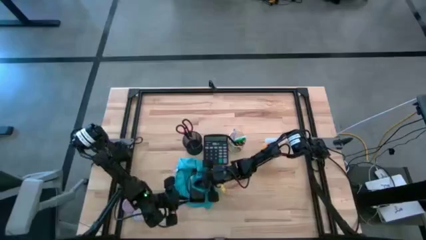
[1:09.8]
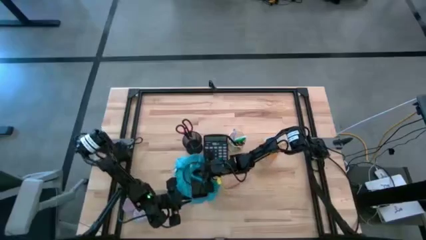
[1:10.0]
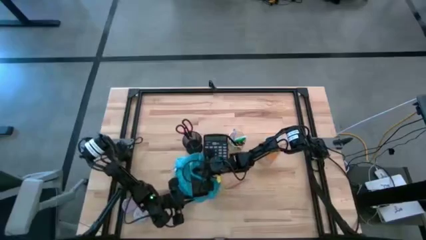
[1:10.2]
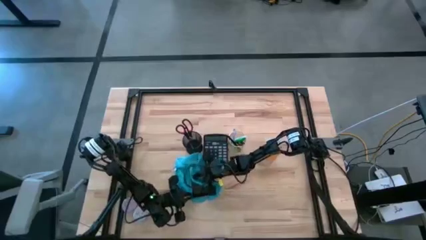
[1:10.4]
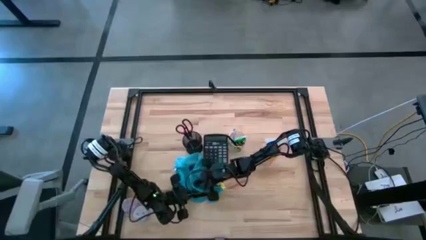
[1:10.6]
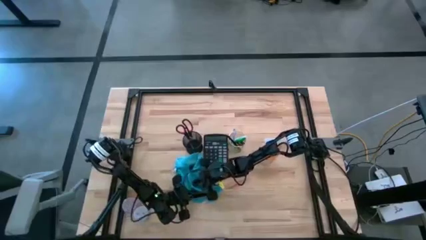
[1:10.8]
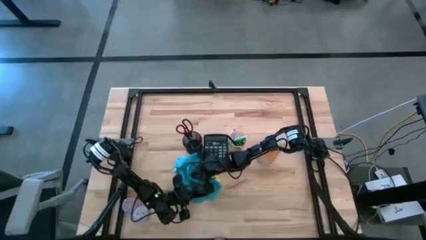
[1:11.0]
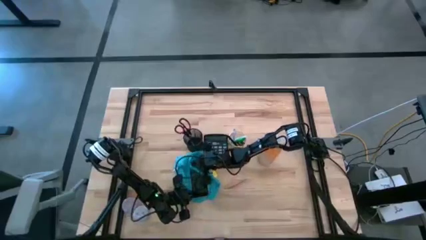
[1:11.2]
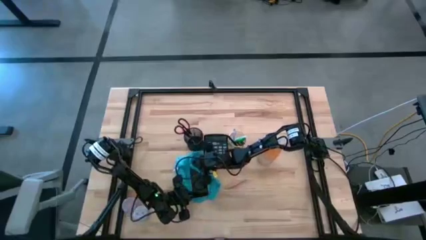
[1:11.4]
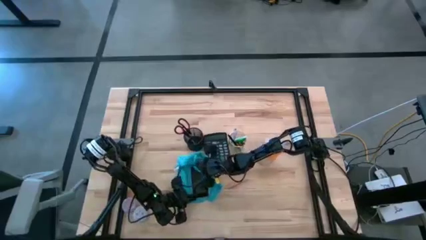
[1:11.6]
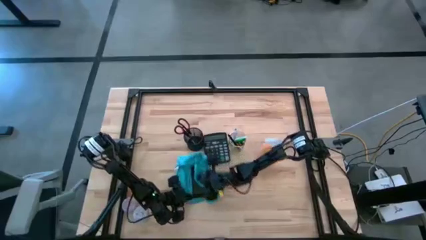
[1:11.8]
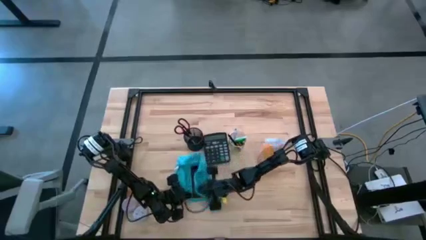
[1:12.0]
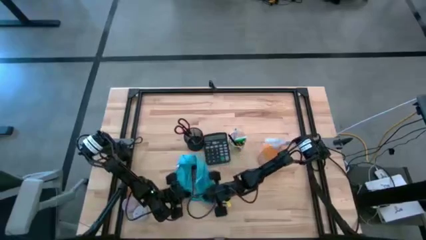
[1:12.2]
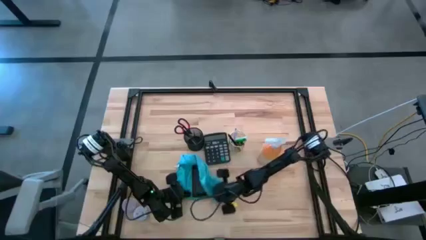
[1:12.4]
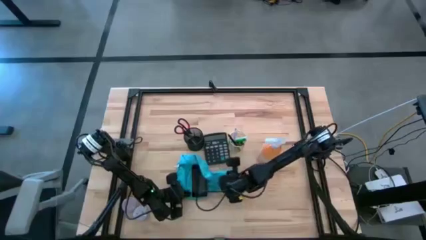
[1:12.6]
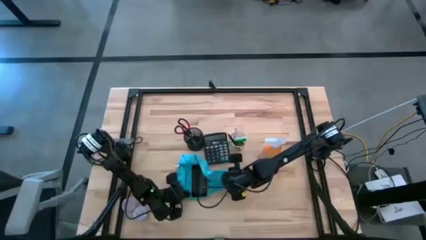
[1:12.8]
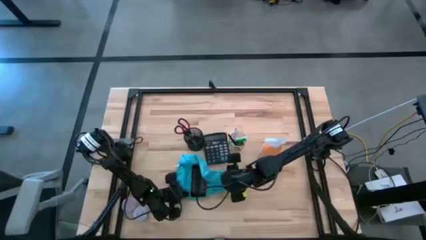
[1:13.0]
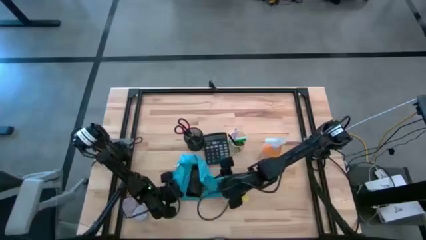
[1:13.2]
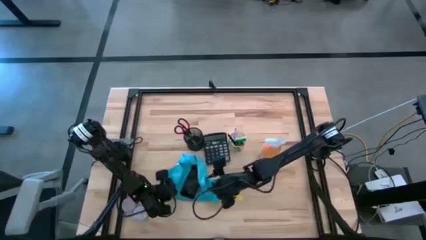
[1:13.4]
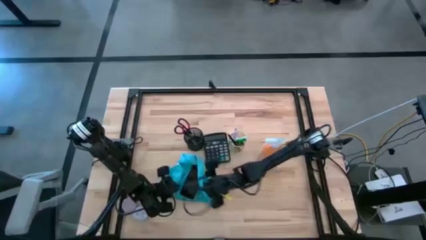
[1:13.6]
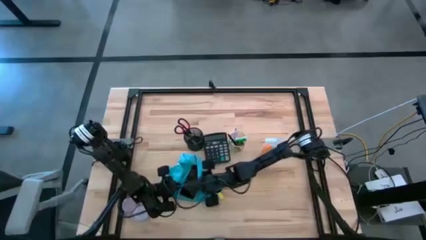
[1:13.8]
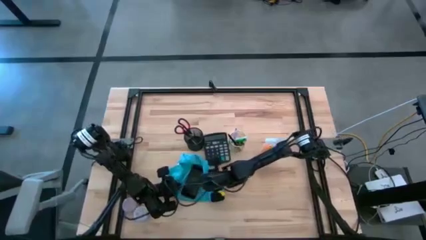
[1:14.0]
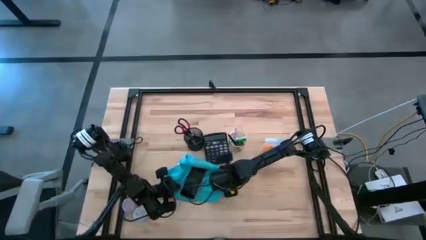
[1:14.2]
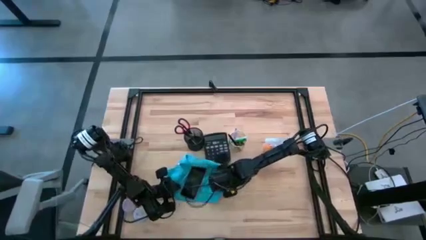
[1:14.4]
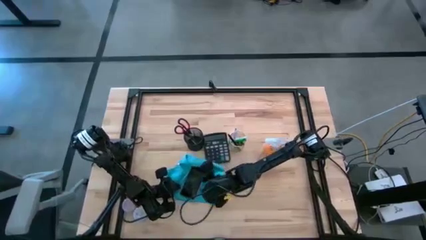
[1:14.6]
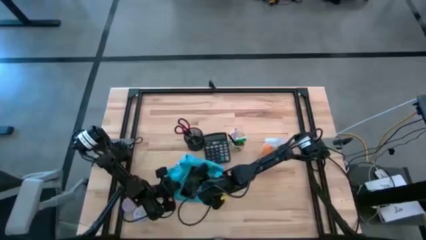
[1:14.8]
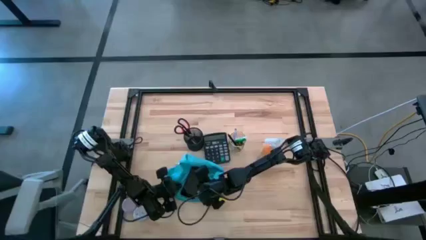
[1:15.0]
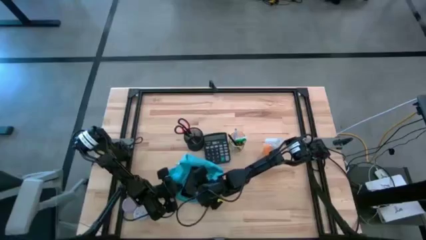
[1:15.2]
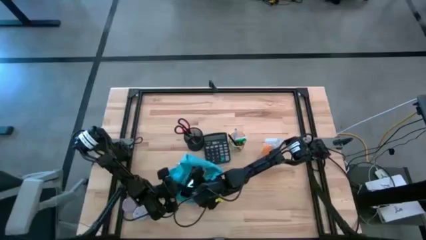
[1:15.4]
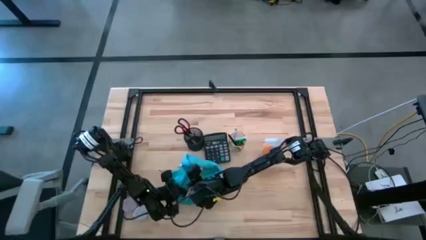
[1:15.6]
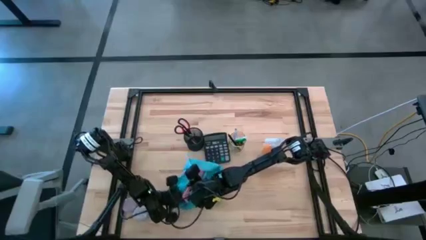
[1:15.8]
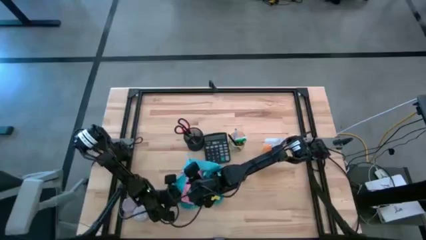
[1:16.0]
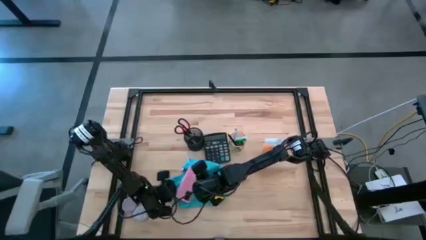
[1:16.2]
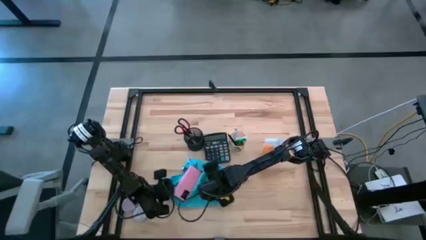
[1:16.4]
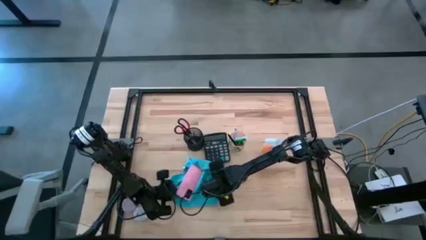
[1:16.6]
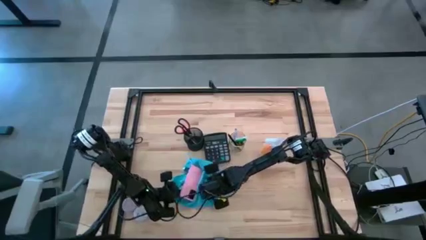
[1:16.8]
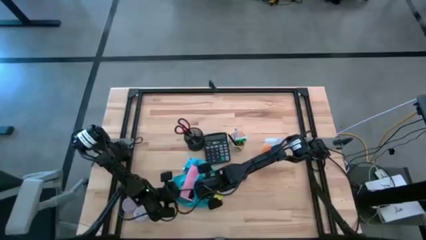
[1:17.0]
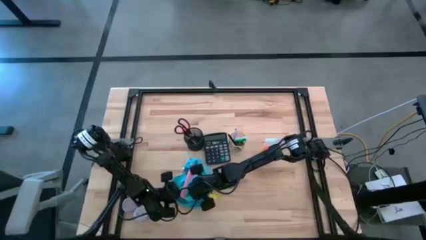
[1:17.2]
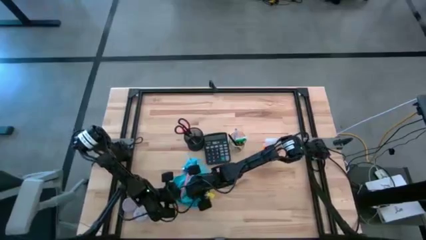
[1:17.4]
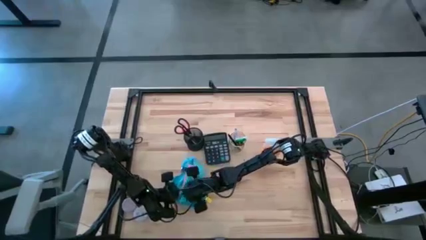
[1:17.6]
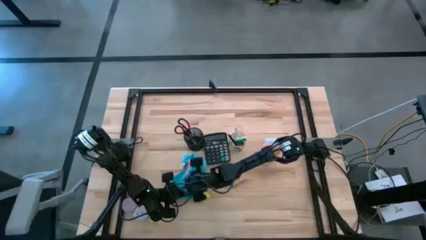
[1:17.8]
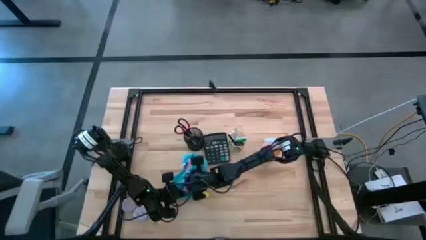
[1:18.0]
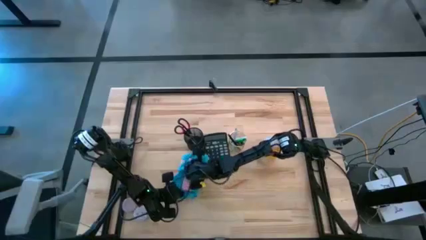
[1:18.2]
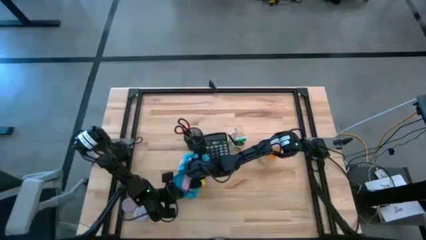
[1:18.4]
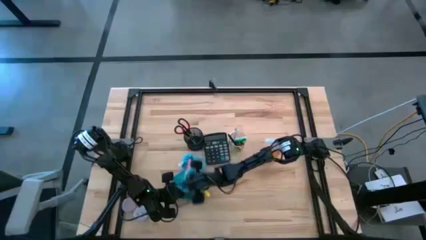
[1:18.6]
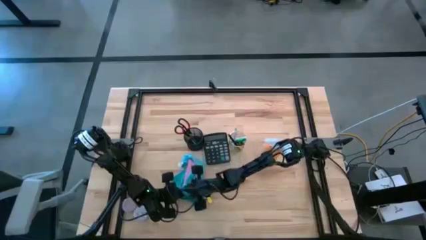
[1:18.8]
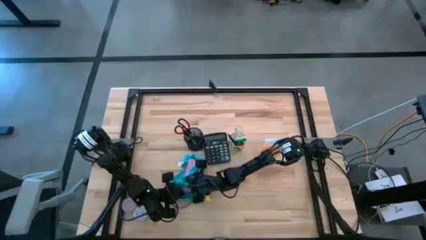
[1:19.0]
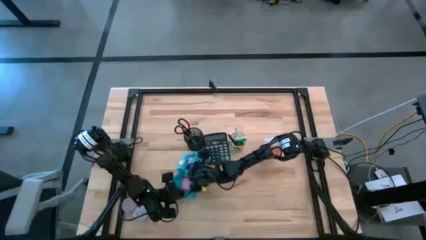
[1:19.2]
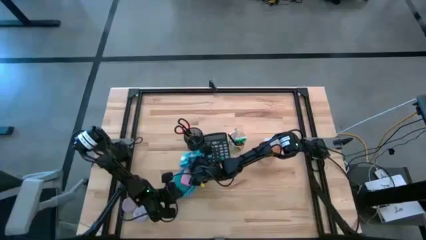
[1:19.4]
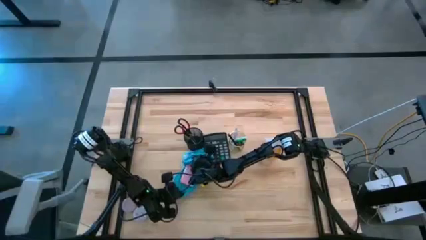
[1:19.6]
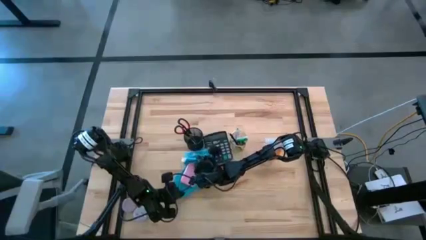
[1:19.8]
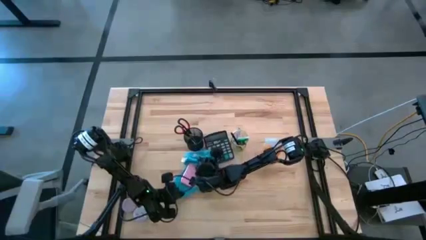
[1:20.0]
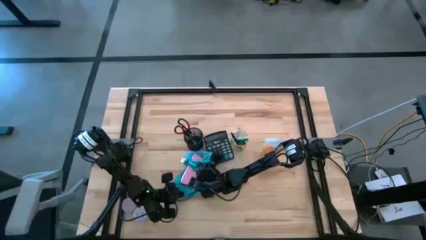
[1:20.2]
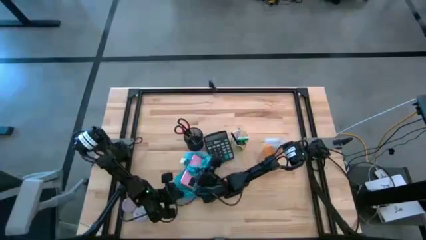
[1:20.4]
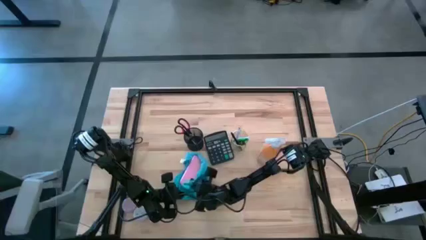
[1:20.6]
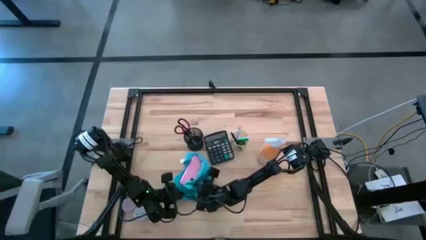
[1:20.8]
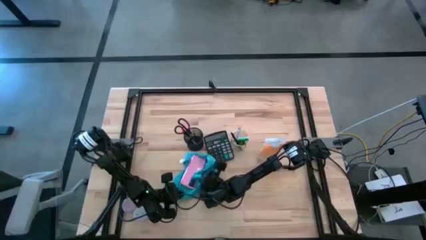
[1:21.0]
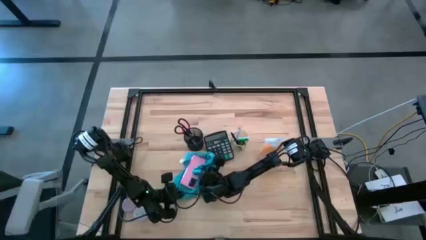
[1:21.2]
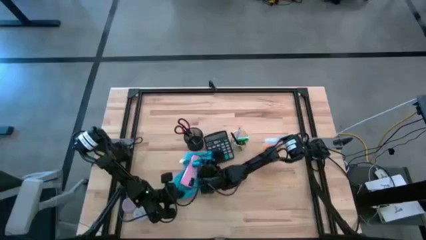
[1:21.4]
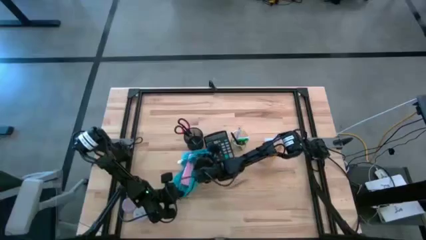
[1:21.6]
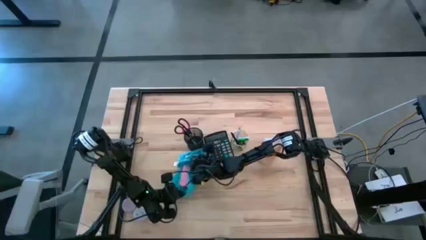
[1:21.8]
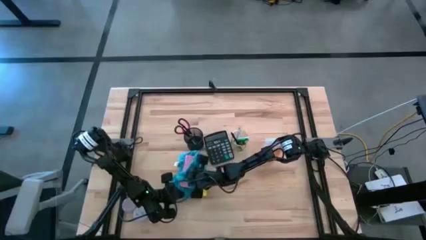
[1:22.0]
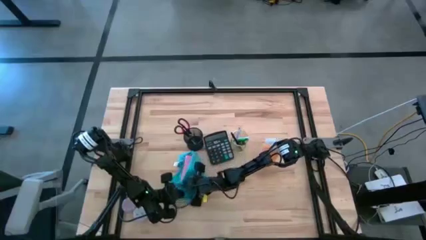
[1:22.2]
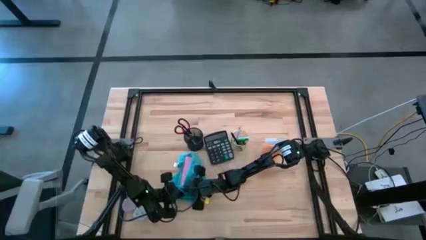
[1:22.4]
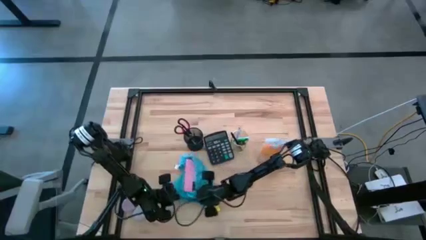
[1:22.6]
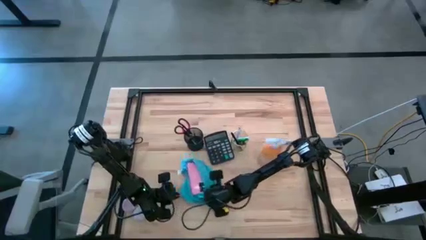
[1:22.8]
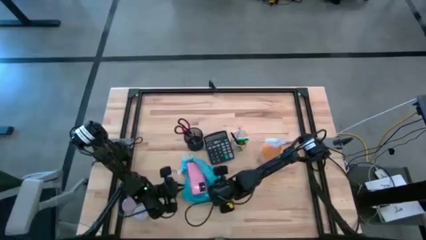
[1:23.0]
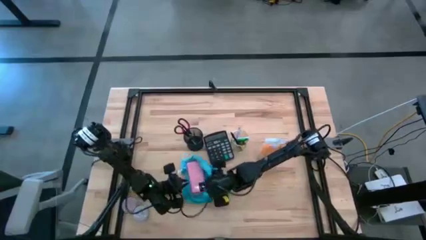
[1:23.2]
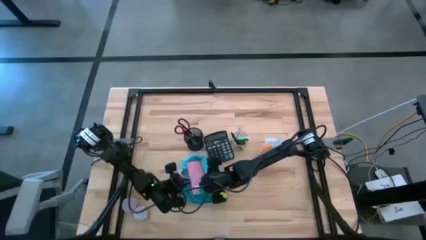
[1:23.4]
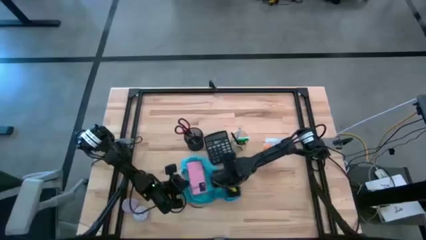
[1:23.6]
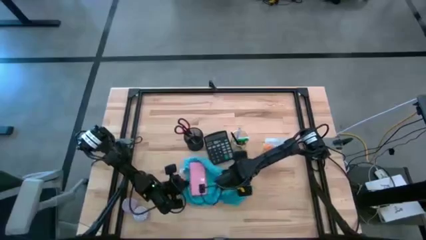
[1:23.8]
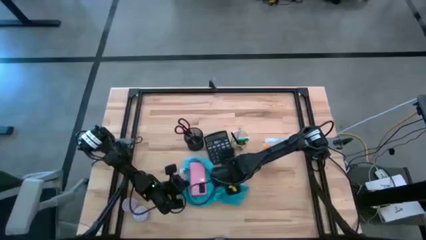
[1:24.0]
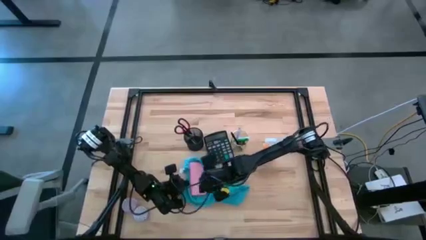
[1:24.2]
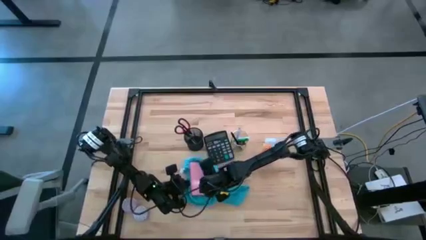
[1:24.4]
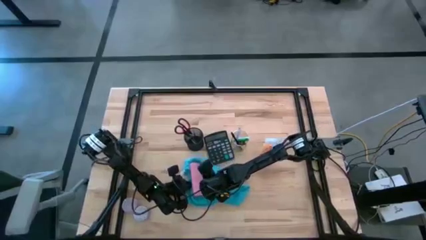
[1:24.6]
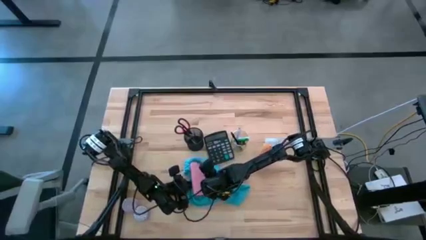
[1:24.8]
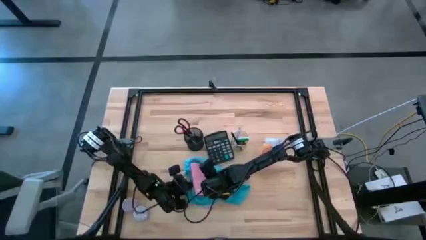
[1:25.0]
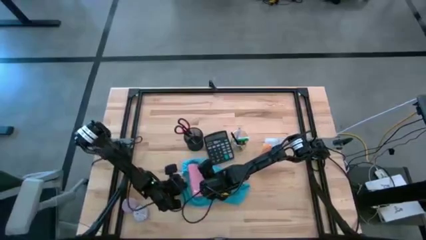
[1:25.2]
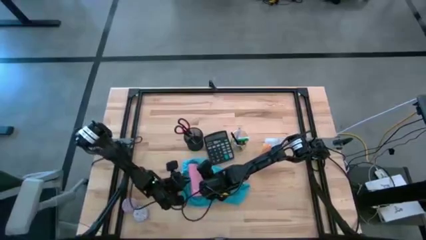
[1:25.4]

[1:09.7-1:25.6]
Task: Apply microfiber cloth
Wipe the front and back of the cellphone with the blue microfiber cloth
